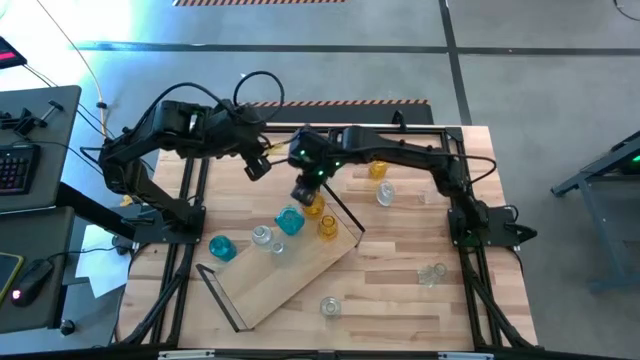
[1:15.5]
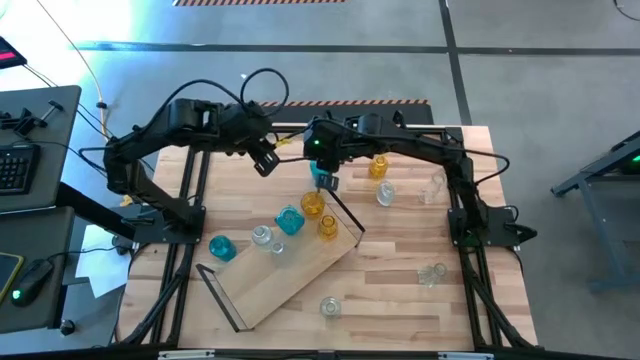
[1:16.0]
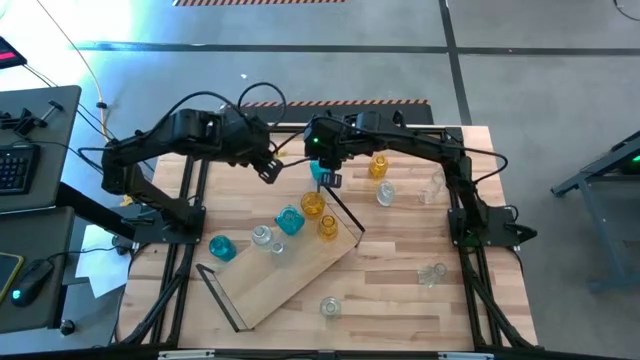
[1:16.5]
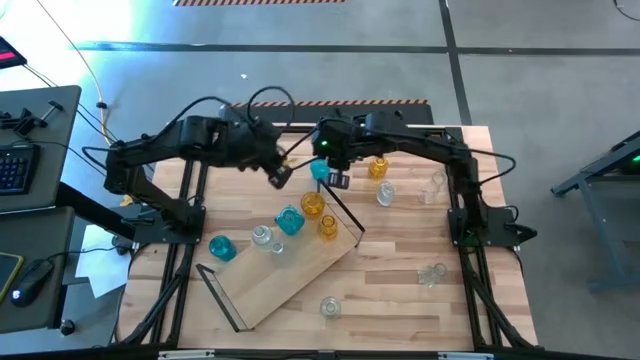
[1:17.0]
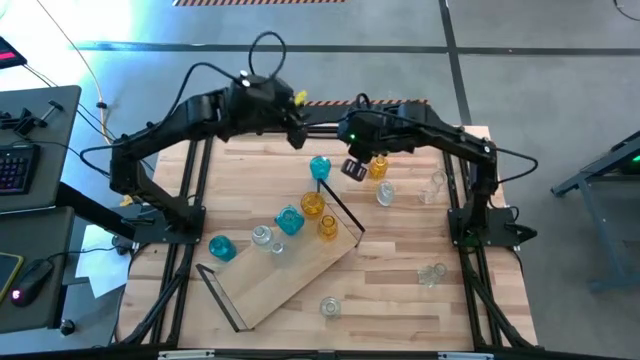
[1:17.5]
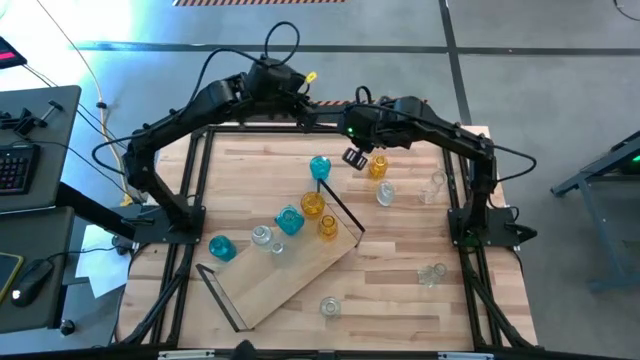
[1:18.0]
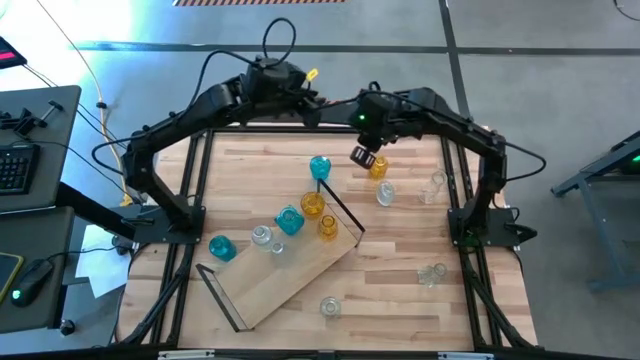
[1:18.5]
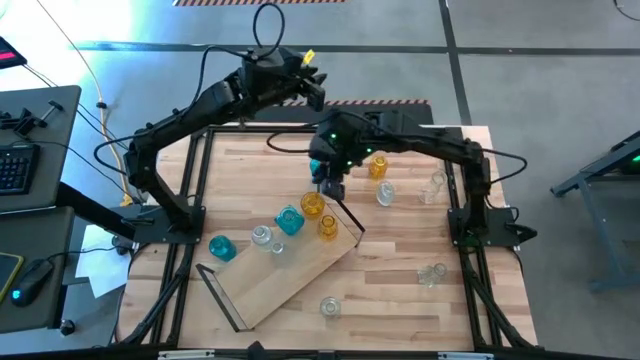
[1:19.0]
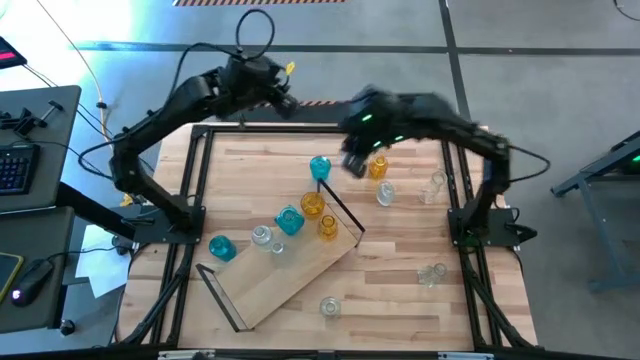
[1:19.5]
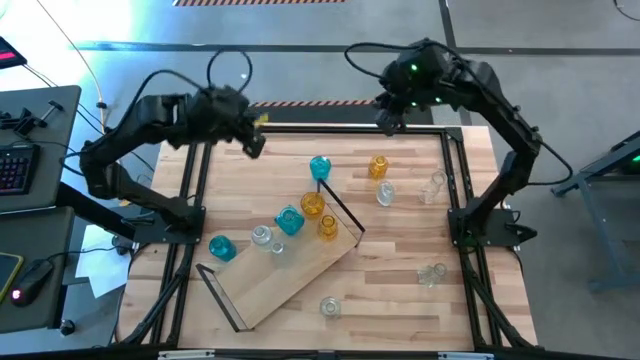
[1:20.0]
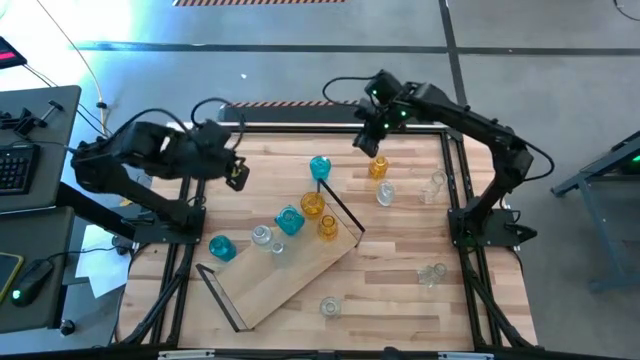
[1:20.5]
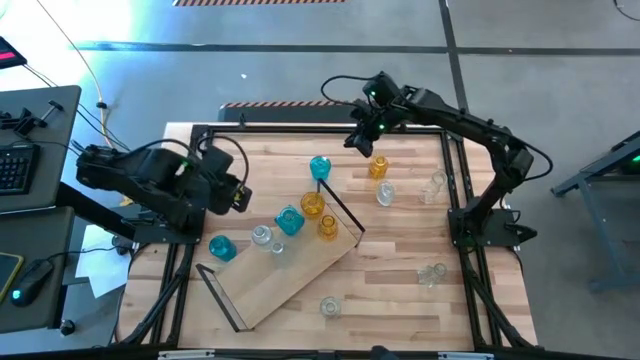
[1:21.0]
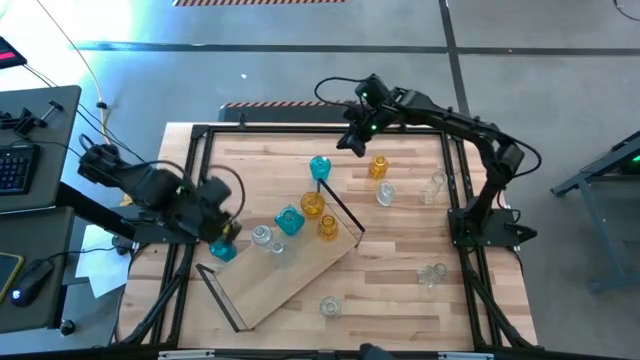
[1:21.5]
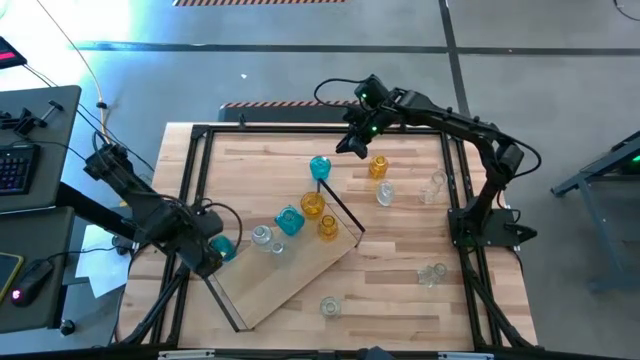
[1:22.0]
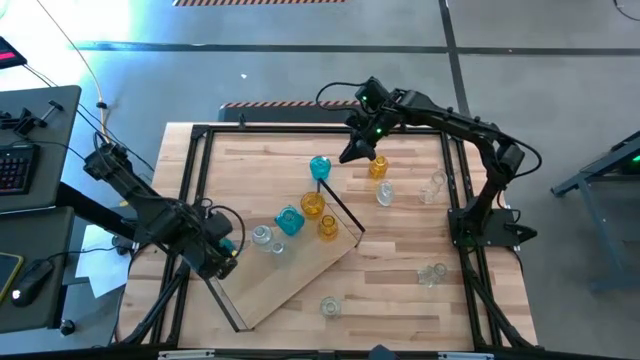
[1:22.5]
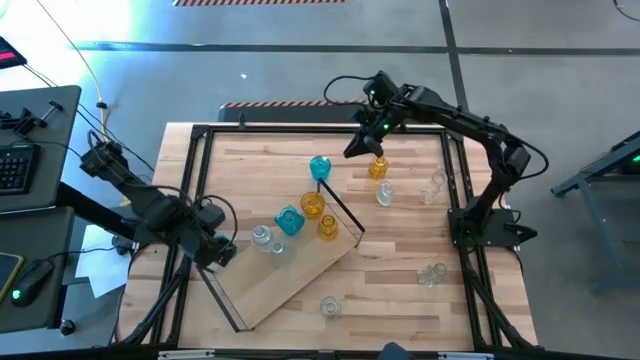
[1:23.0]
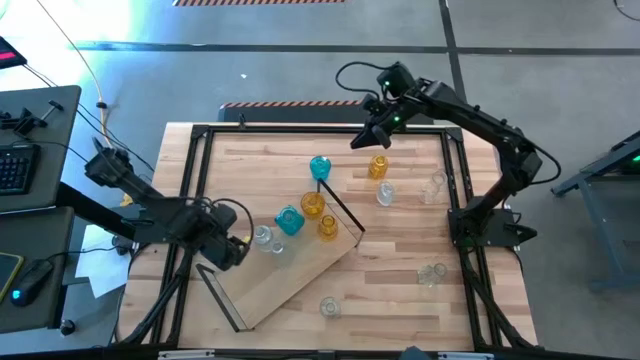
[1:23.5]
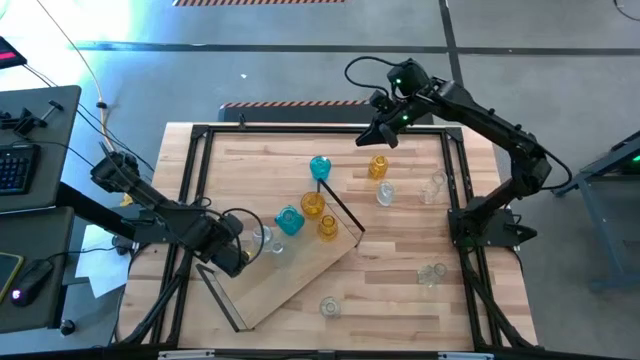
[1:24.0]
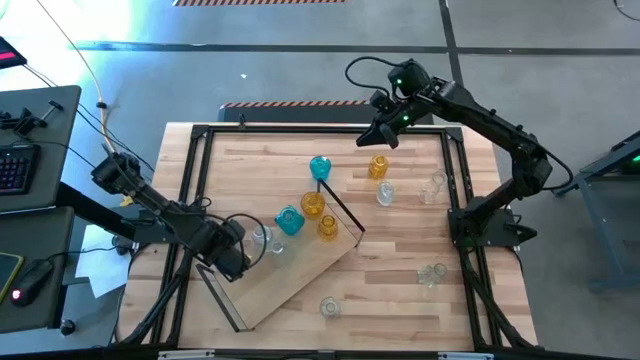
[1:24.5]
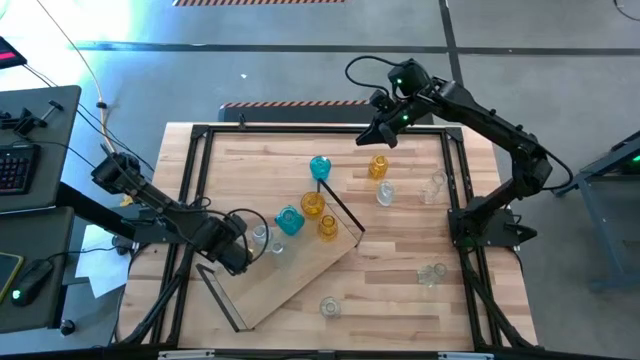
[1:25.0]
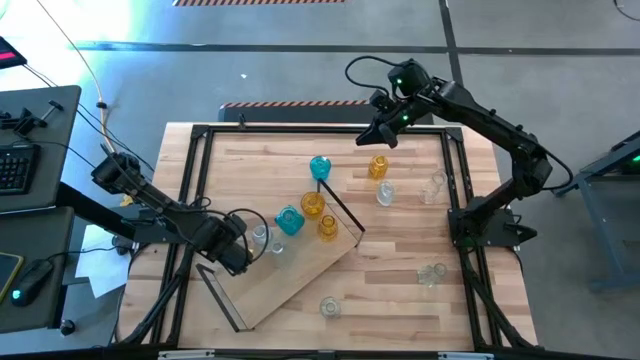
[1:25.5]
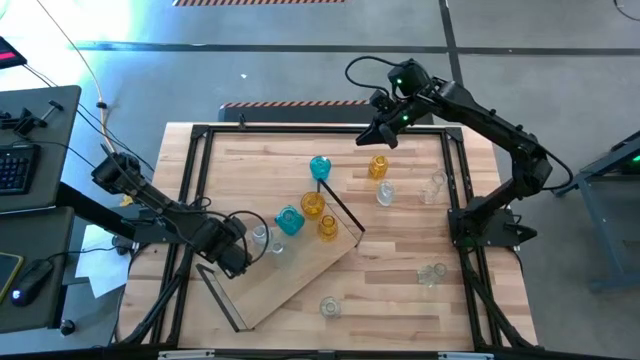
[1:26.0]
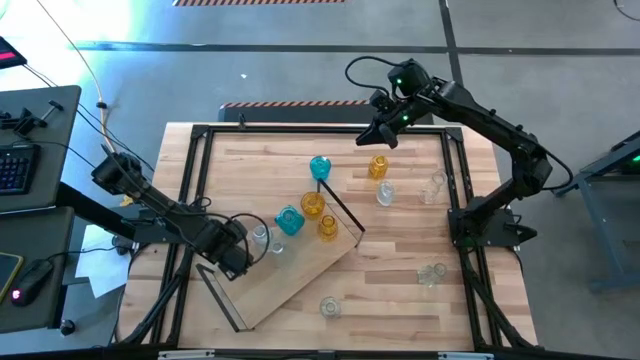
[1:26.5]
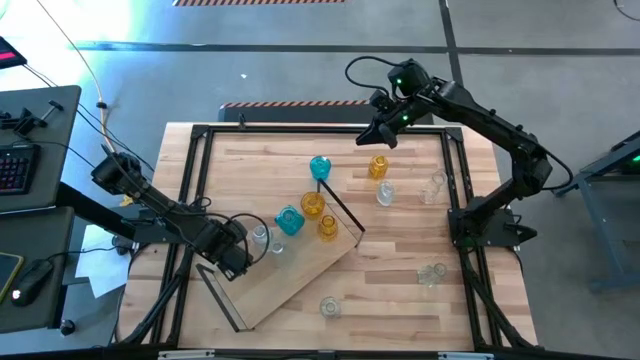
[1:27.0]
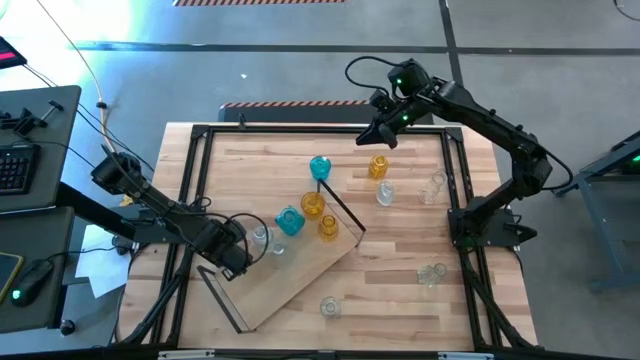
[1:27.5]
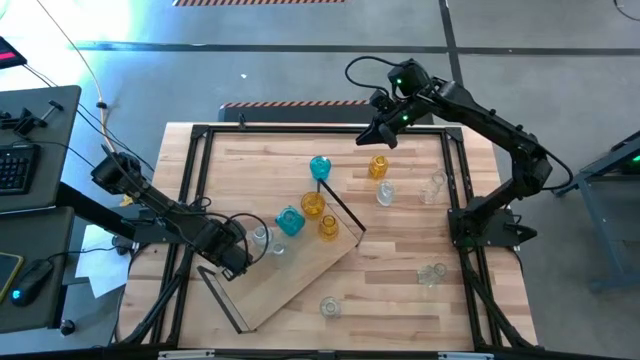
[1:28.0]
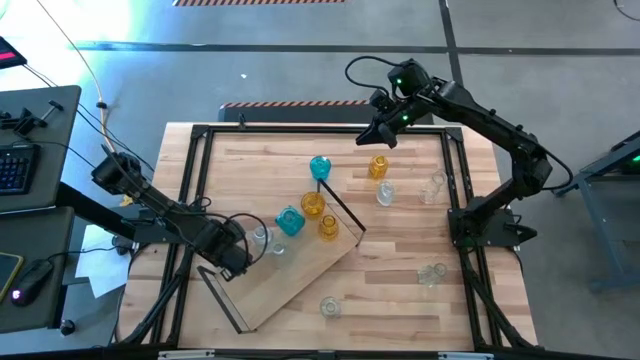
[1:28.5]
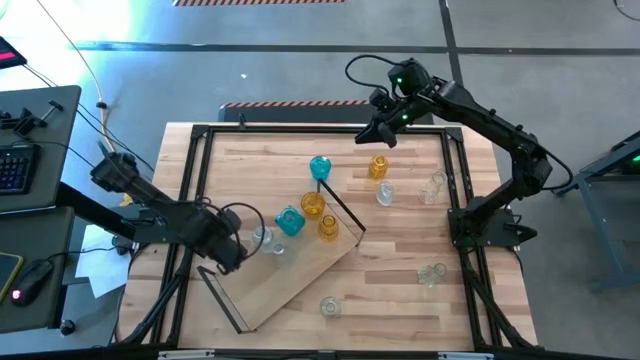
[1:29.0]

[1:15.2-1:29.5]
Task: sort vases onto shelf
Put the blue vase on the shelf aligned with the other blue vase

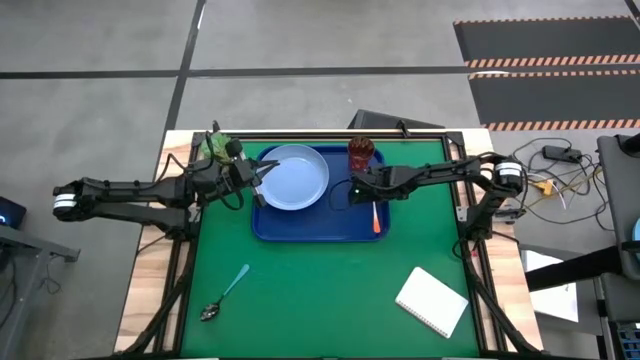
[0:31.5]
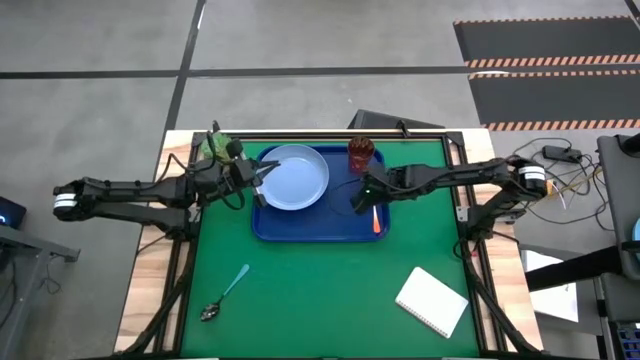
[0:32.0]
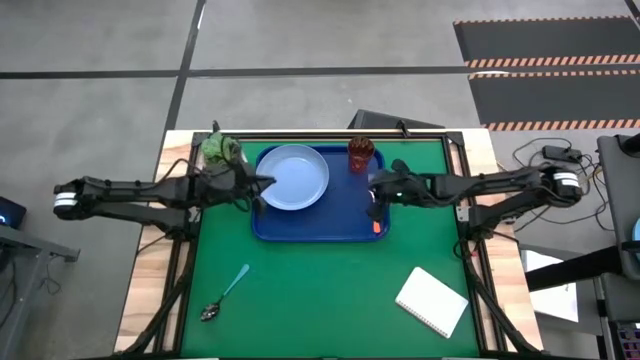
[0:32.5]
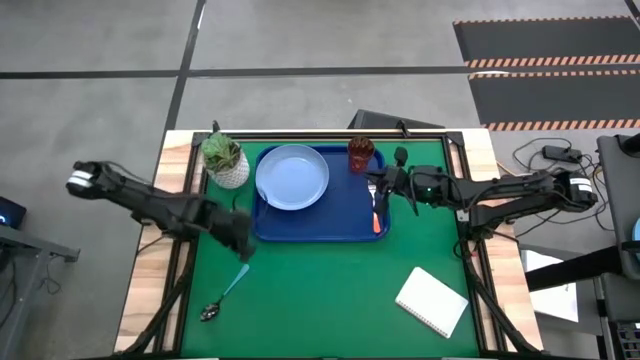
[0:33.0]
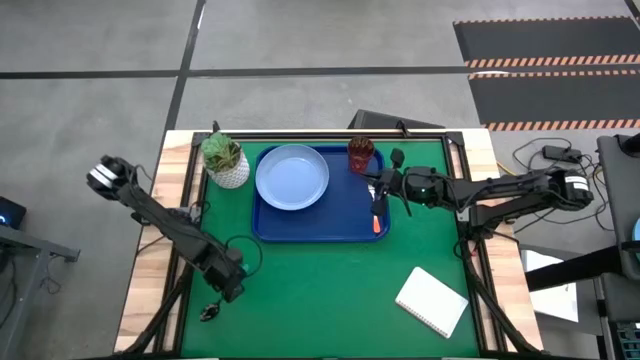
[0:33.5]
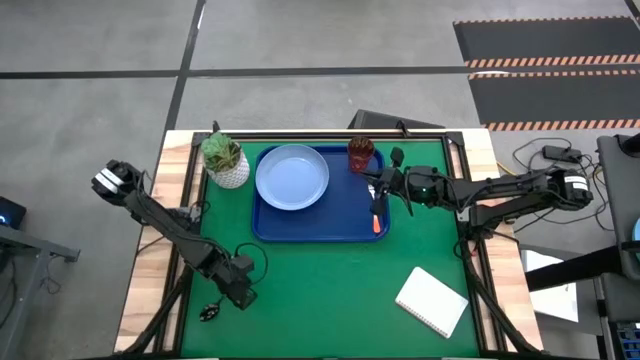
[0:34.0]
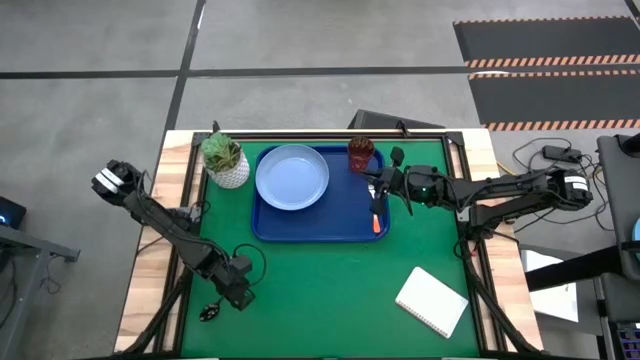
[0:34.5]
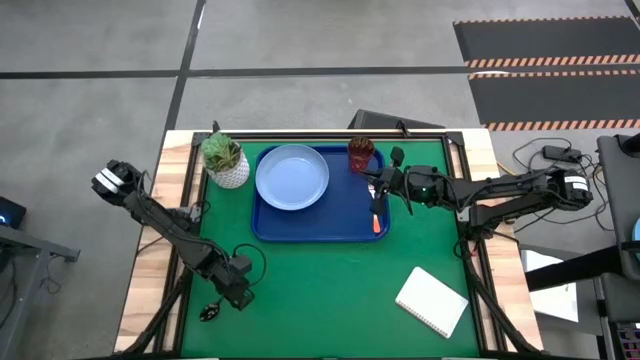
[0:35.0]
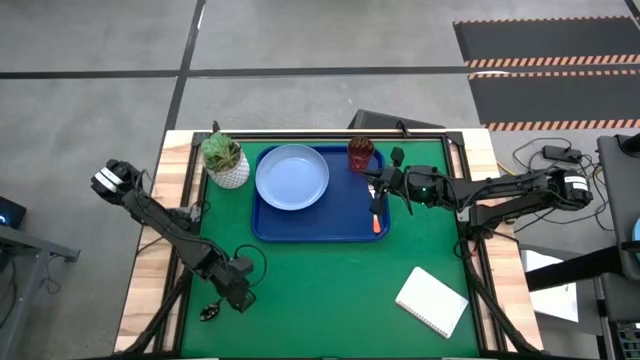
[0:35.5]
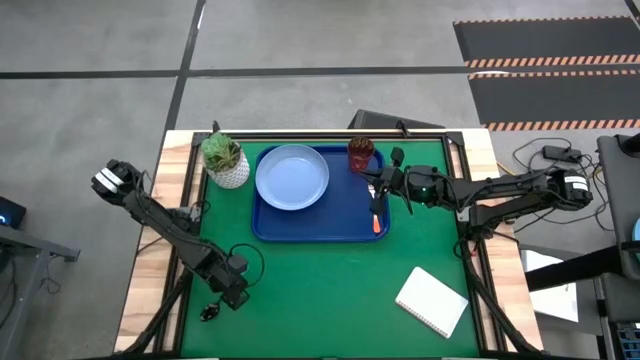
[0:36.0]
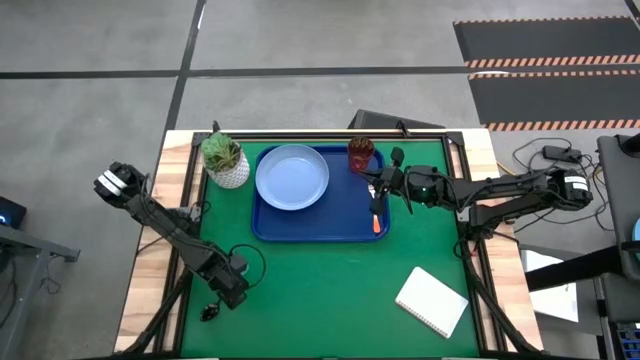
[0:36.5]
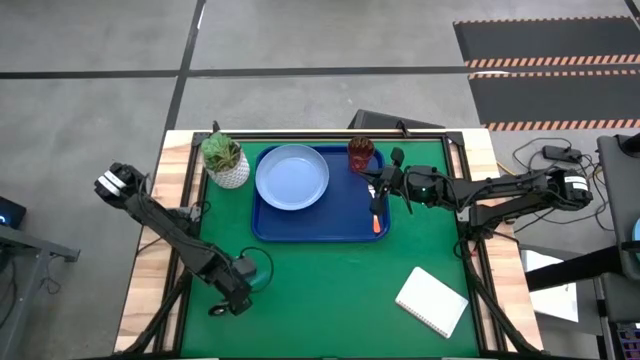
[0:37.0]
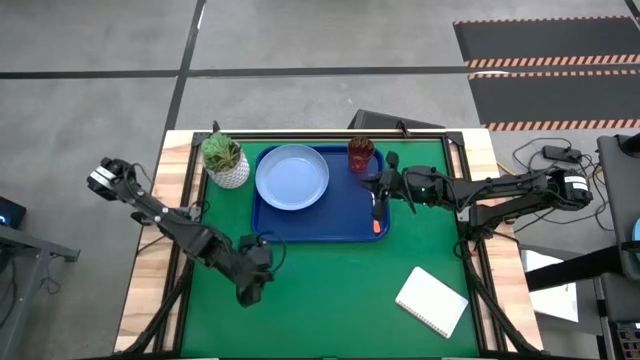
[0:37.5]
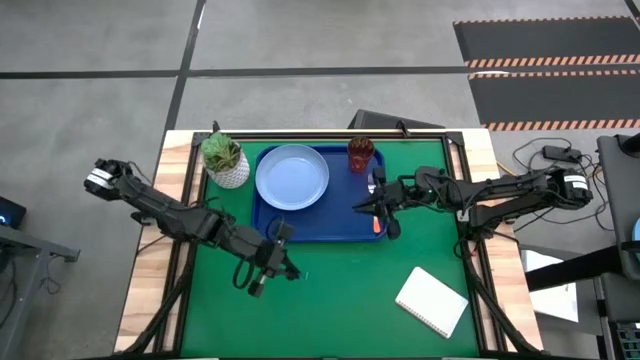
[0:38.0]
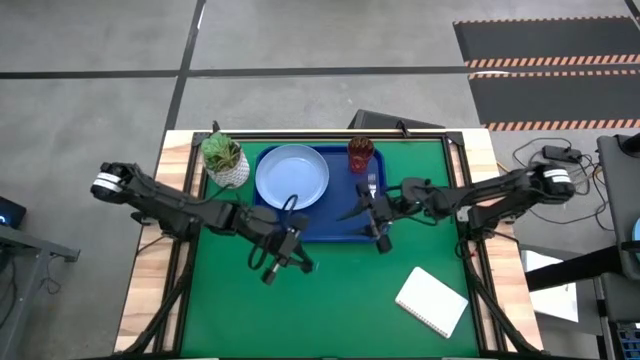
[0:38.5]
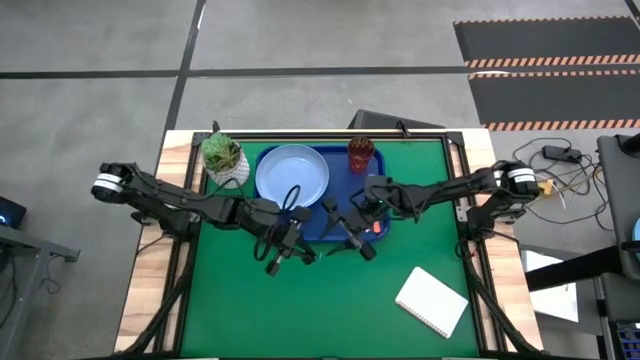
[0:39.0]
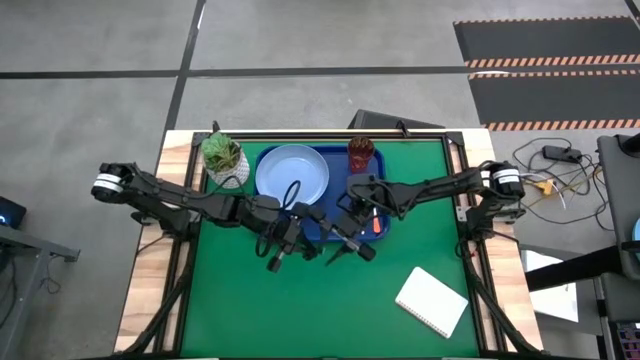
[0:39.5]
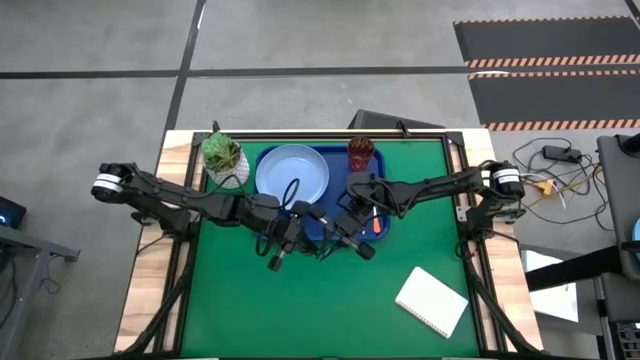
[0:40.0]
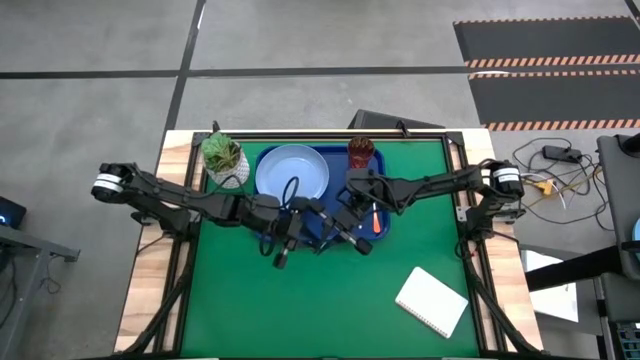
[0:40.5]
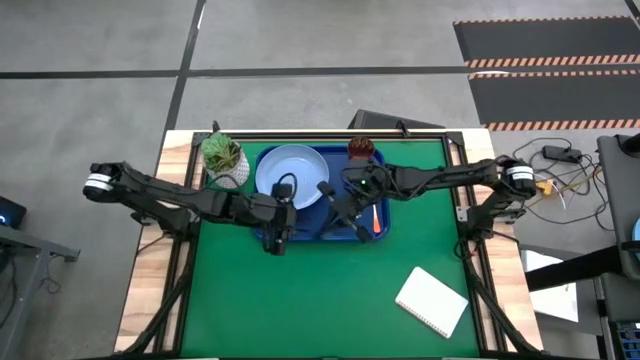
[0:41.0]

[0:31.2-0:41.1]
Task: Pick and place plate/cup/fork/spoon on tray
Put the orange spoon on the blue serving tray
